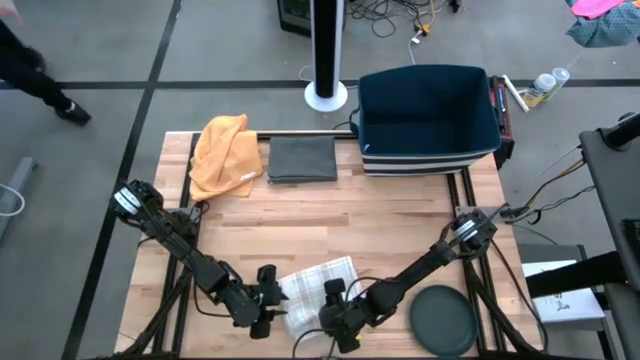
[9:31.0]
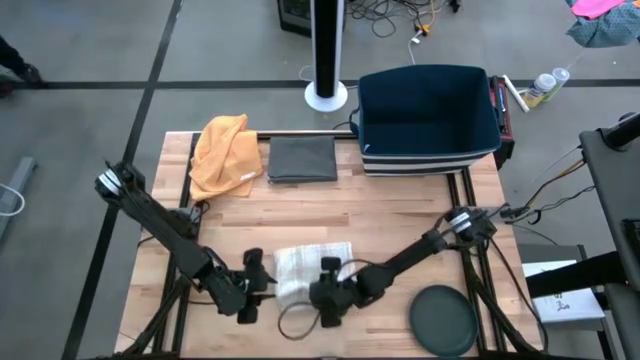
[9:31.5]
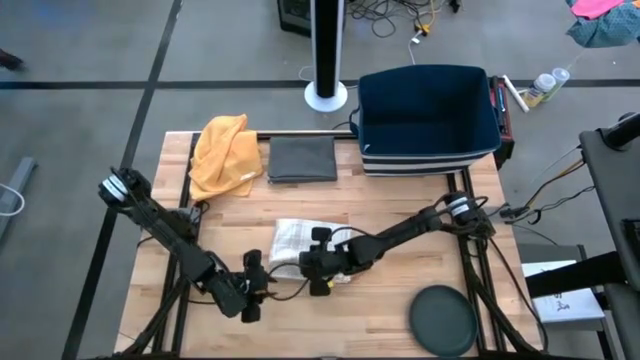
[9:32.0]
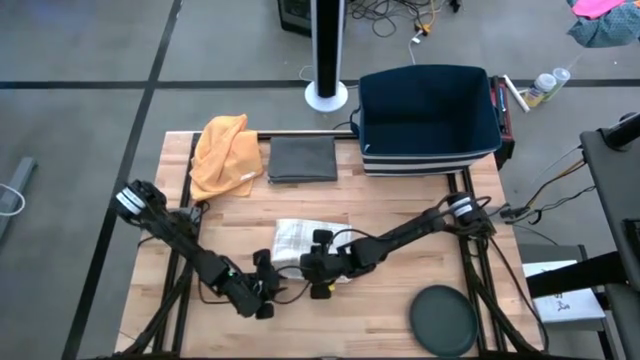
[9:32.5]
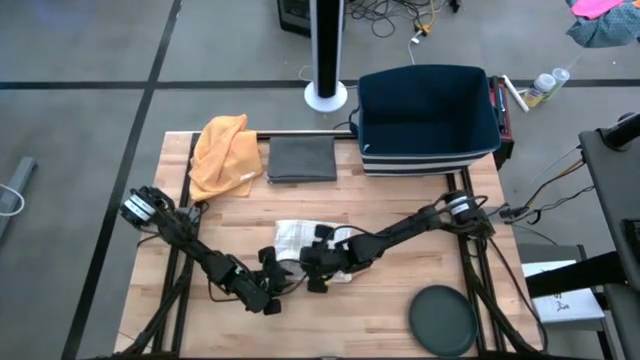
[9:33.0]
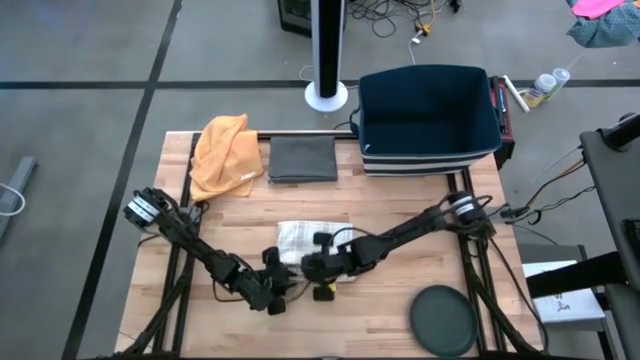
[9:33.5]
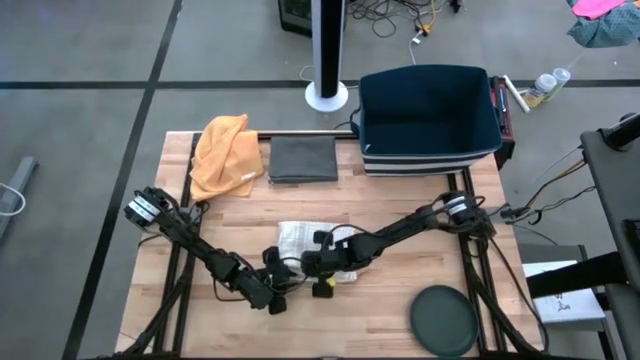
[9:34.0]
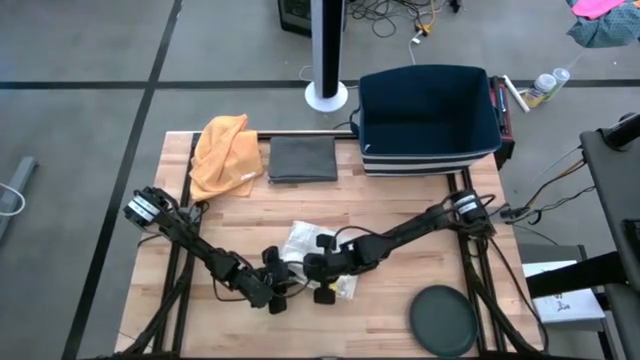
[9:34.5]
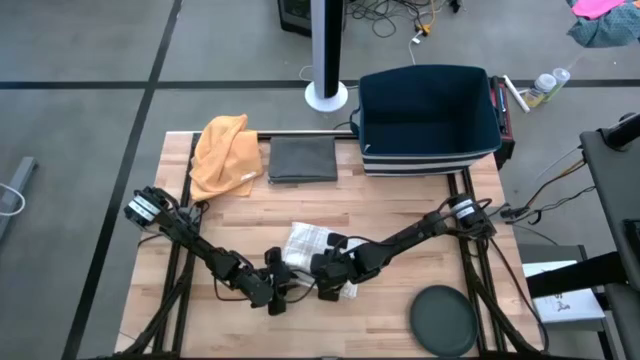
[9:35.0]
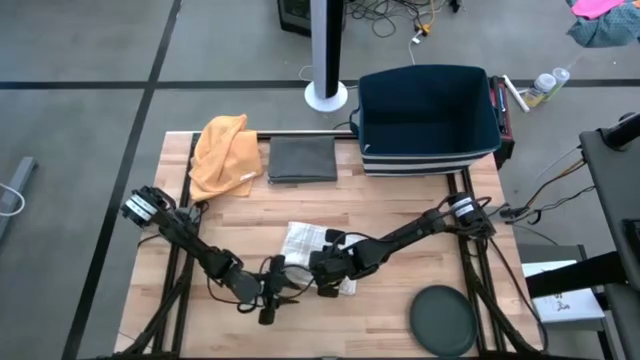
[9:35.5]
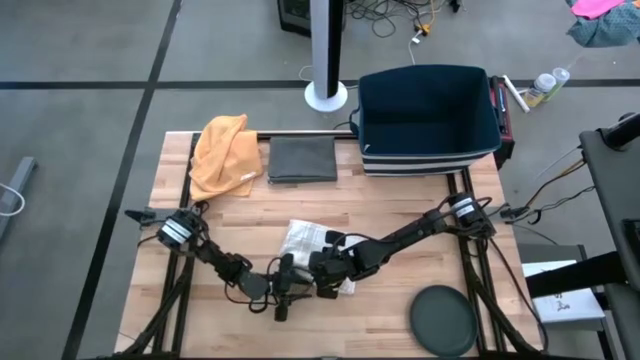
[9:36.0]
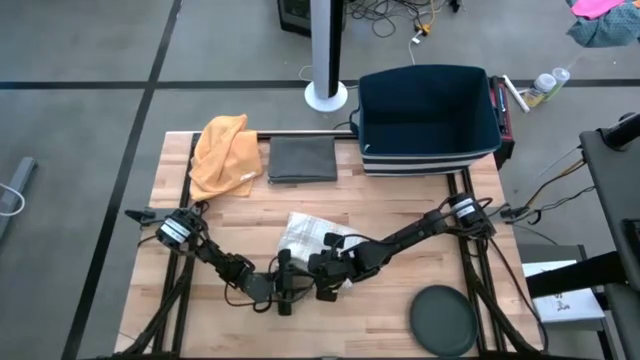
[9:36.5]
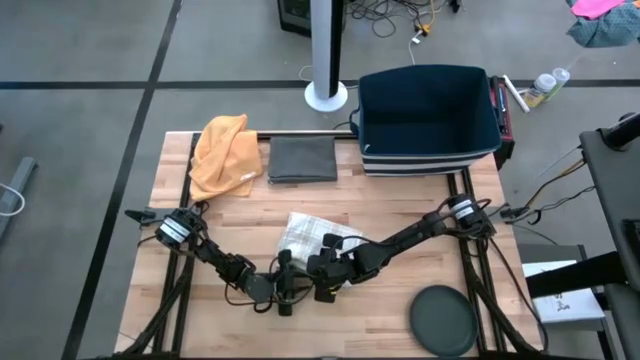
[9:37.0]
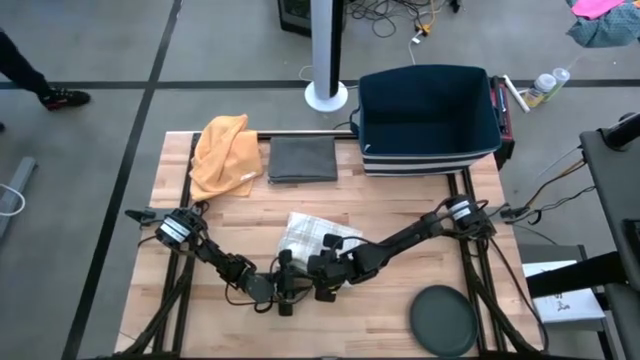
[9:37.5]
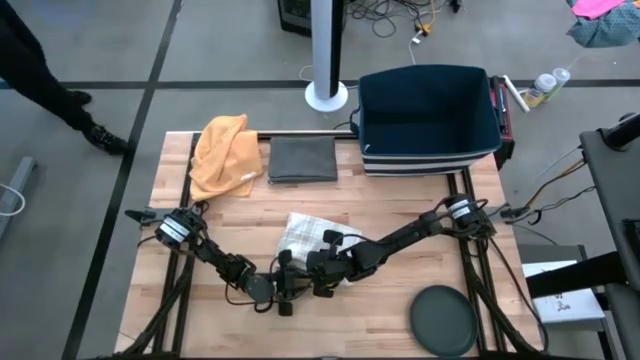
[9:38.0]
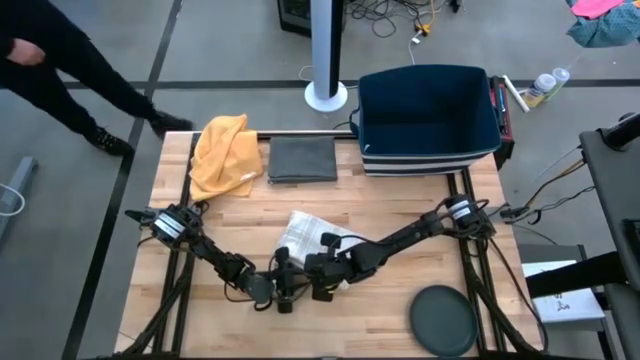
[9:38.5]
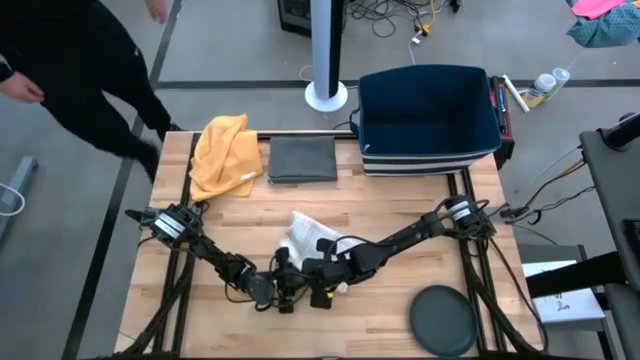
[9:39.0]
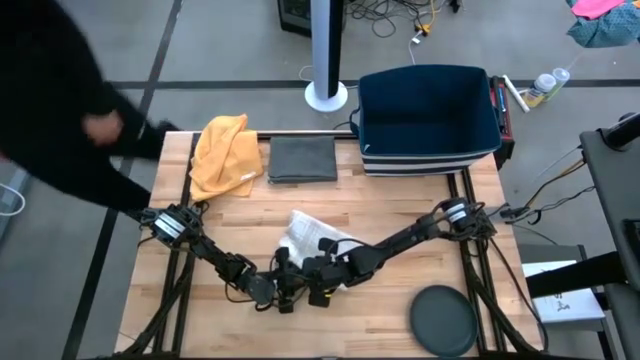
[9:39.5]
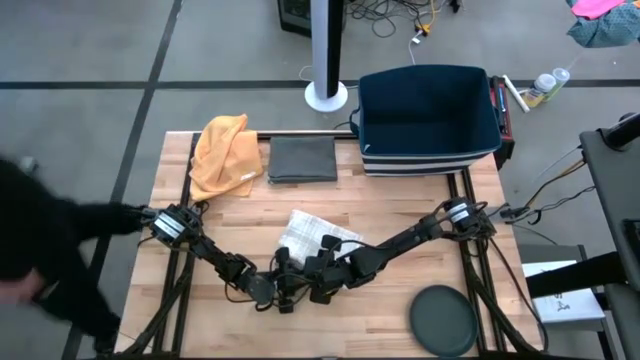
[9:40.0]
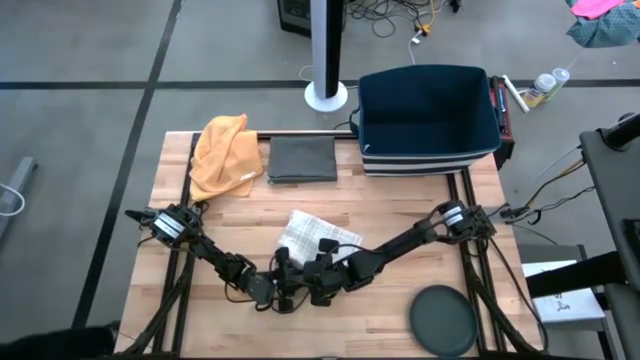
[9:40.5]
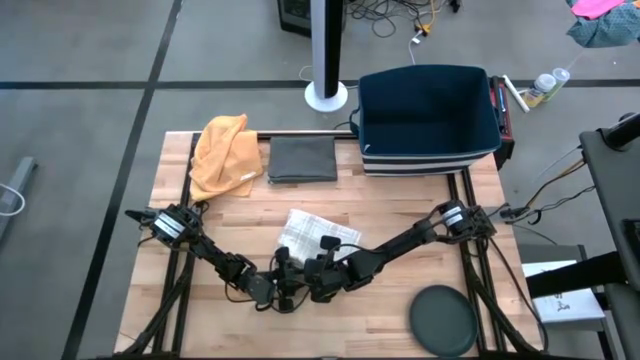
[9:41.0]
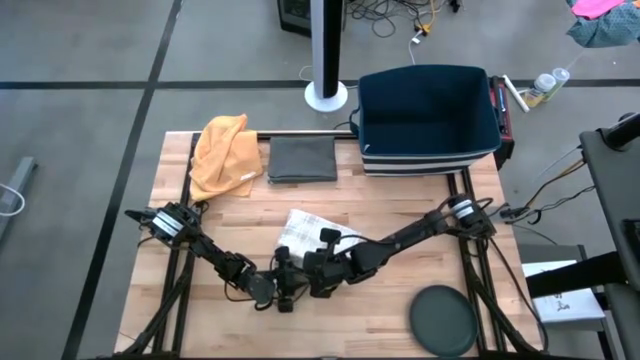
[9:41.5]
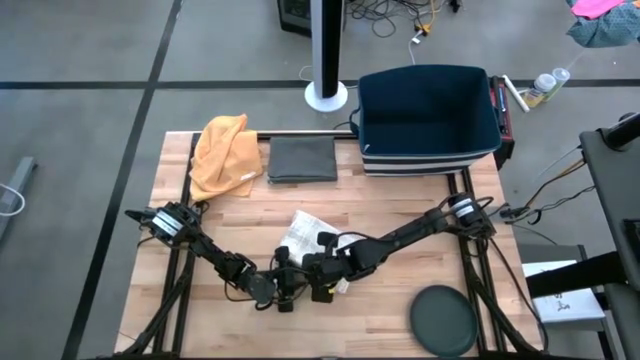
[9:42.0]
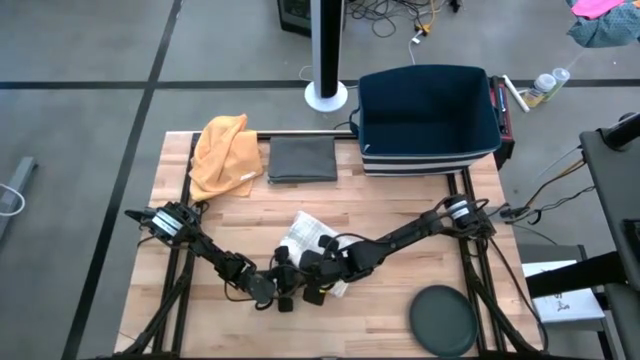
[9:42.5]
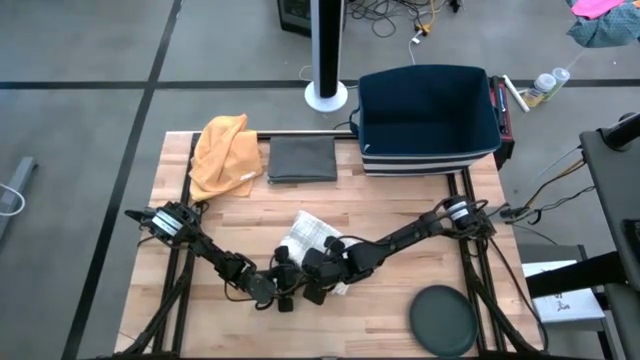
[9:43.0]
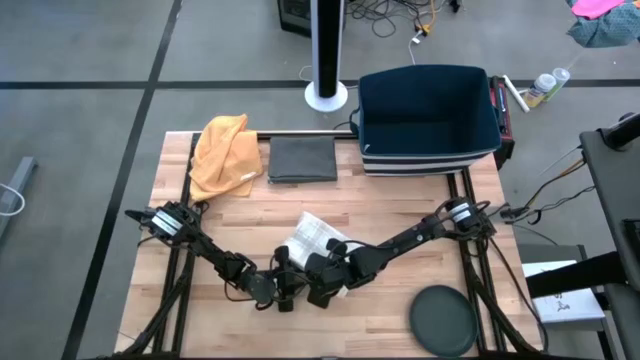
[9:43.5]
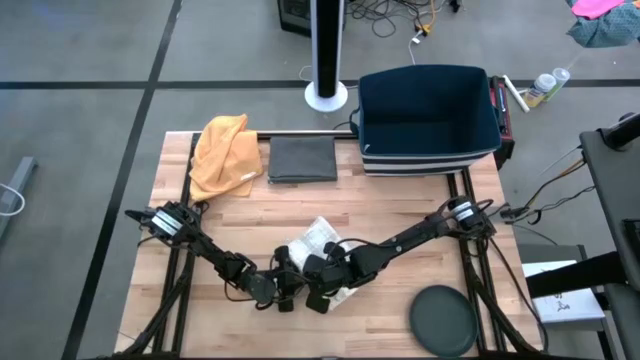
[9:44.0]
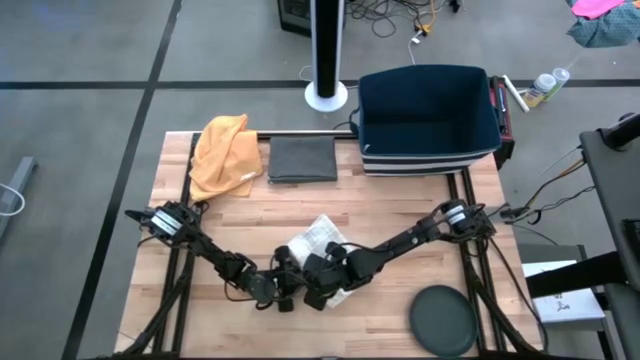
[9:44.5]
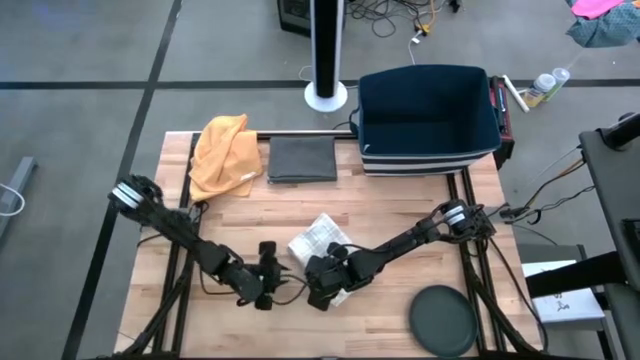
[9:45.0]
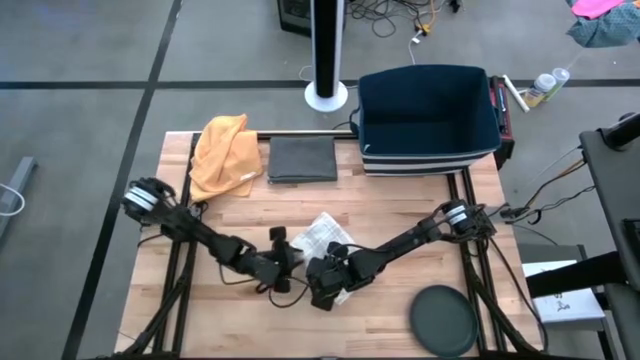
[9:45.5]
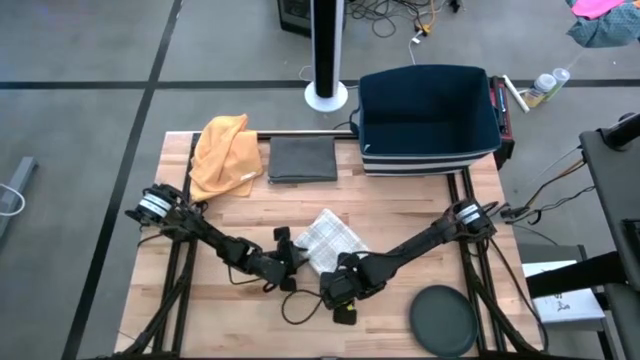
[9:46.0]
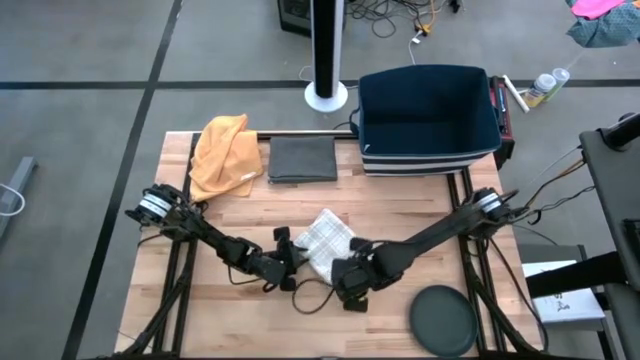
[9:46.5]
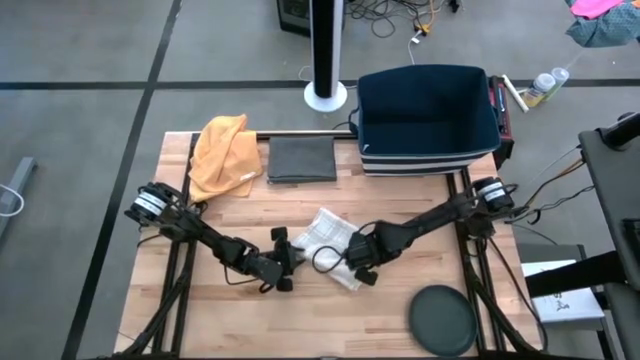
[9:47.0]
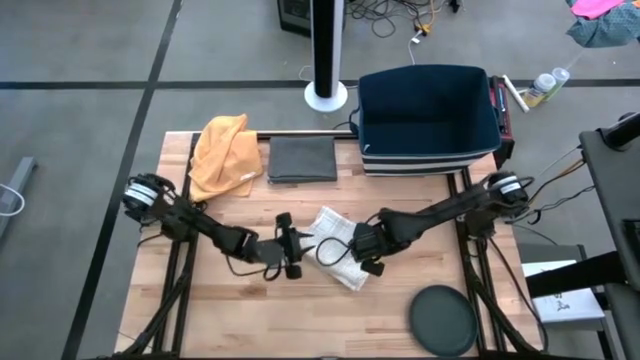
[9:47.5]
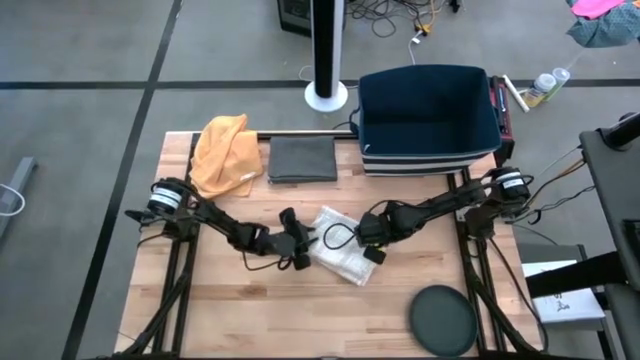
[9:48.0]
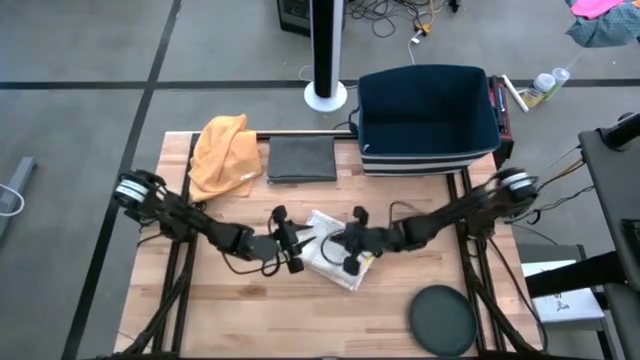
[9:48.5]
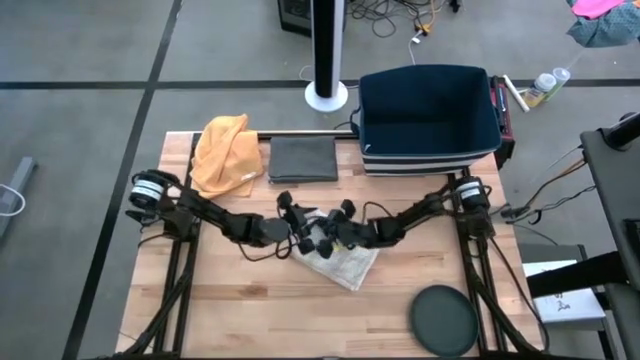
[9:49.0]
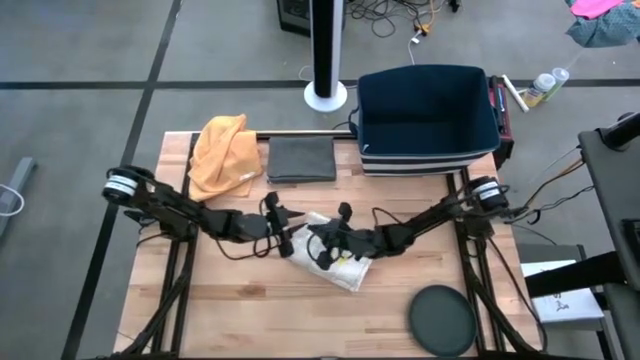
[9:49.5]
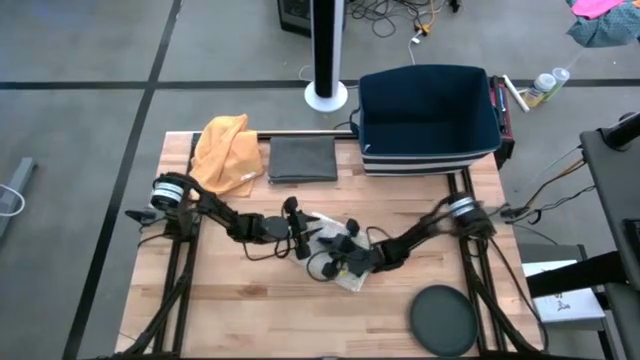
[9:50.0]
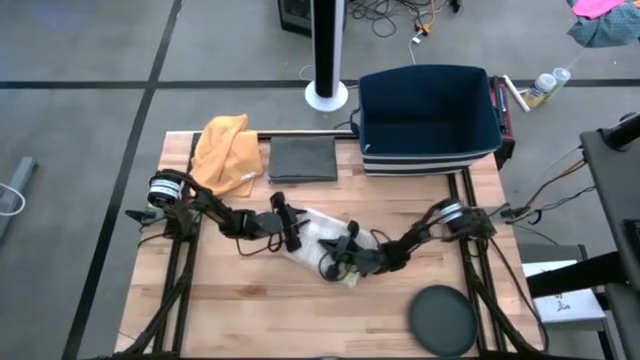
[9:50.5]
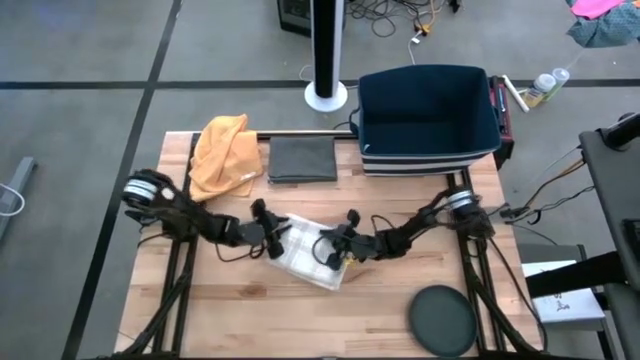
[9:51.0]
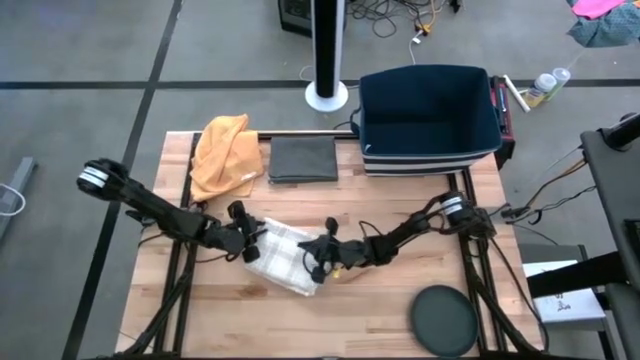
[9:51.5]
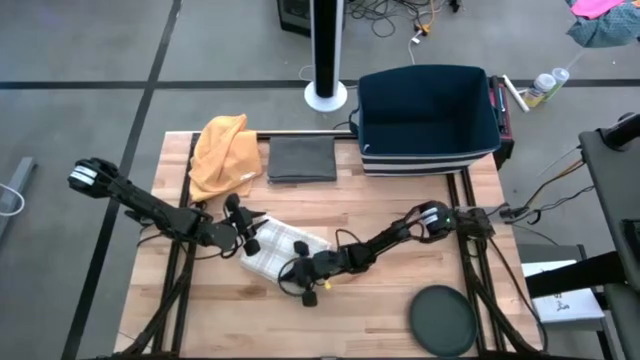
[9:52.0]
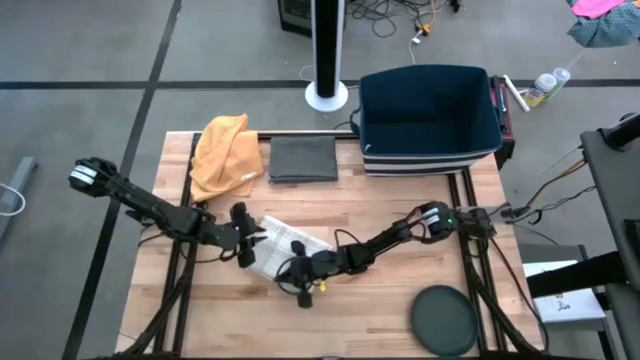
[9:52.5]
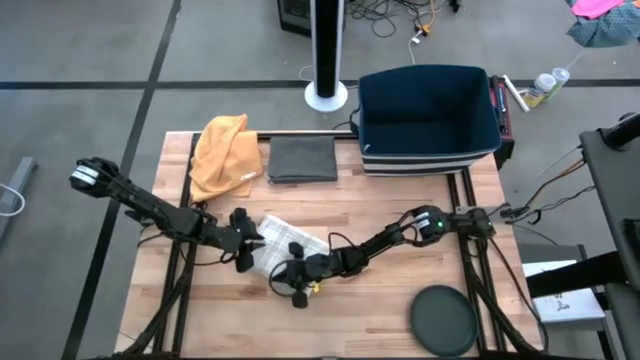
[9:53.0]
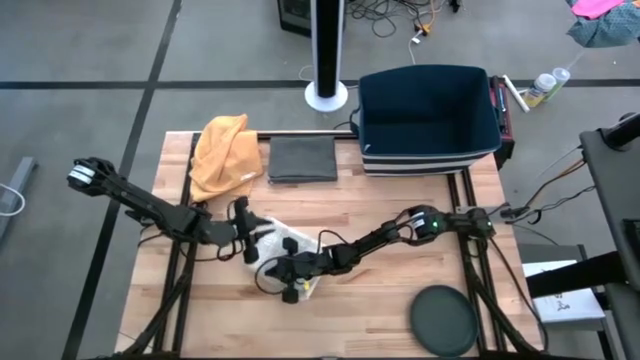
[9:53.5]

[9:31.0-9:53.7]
Task: Fold kitchen towel into neat rectangle
Fold the white patterned towel
